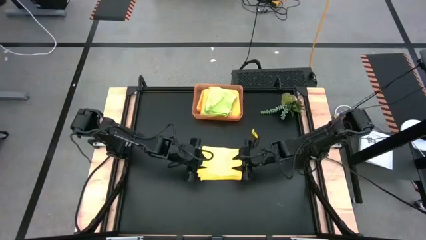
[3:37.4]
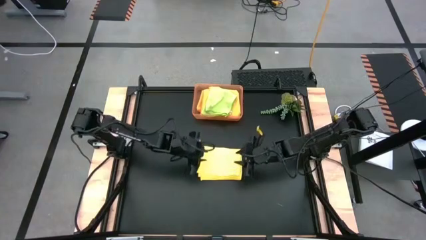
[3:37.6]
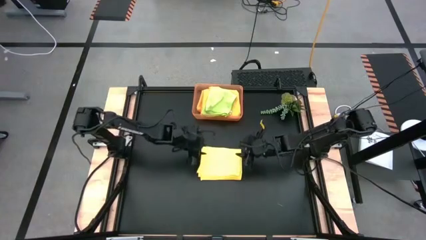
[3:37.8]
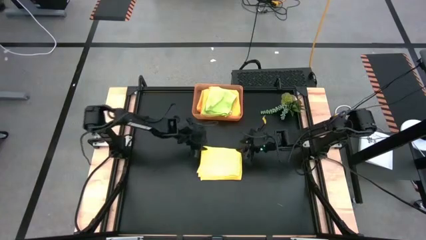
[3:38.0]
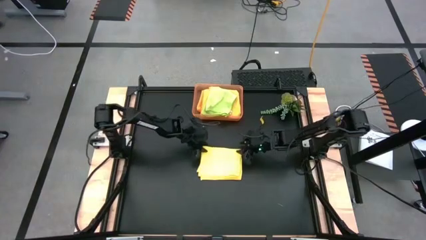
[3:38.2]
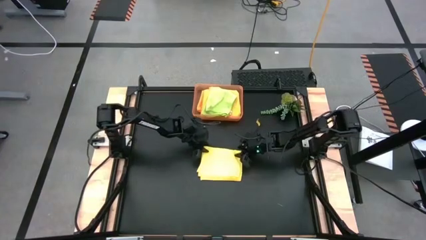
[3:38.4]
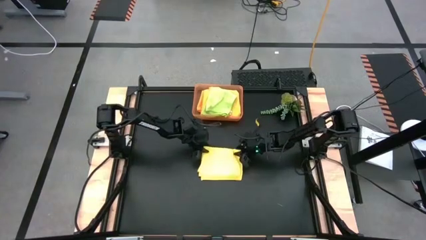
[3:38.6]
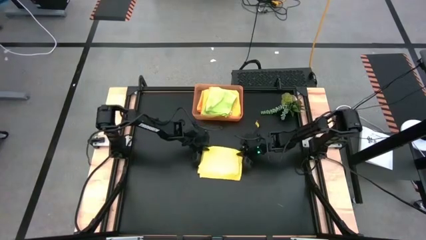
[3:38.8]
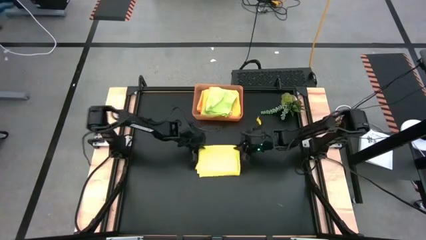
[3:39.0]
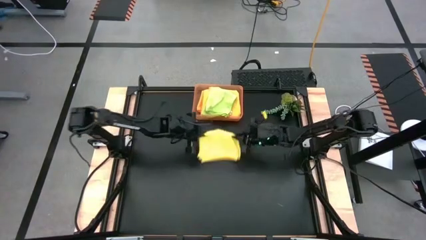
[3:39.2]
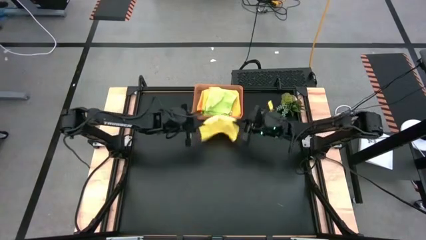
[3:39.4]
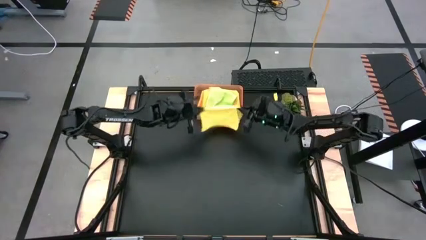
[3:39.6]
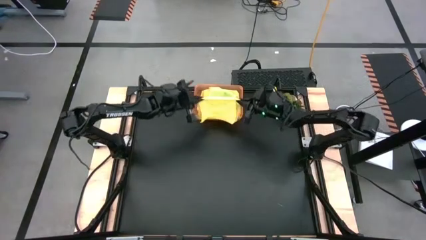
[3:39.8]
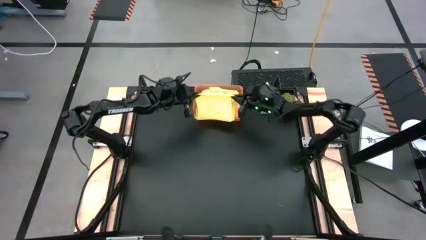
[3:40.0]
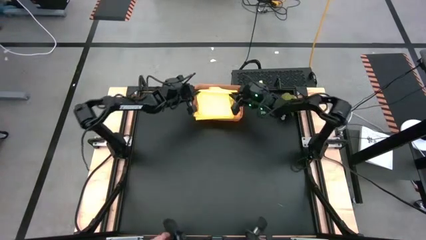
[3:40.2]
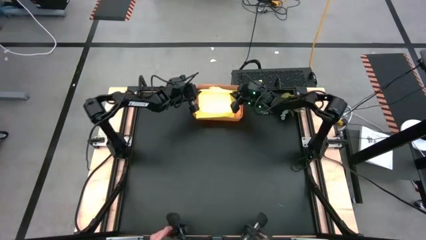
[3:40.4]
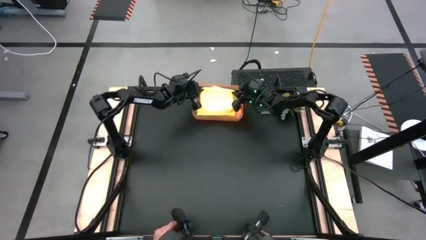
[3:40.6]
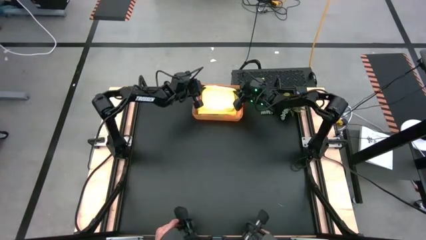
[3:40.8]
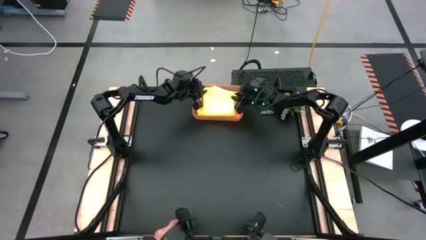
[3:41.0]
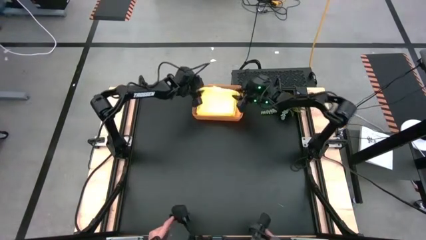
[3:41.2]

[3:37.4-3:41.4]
Task: Fold microfiber towels
Put the folded yellow towel into the orange bin

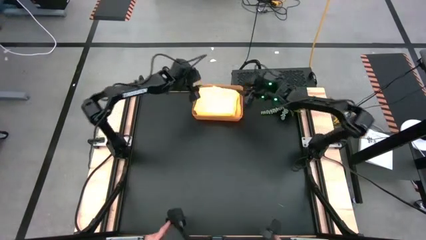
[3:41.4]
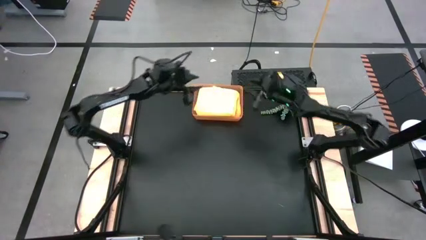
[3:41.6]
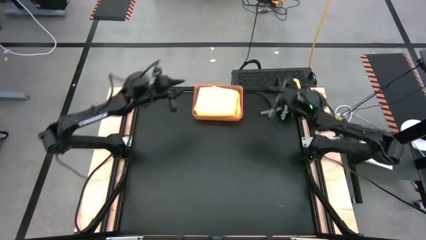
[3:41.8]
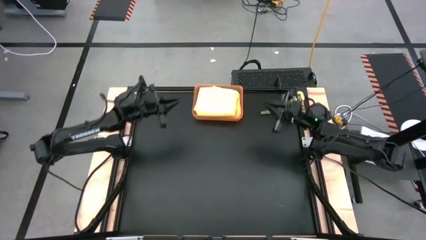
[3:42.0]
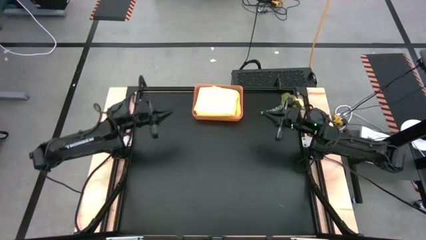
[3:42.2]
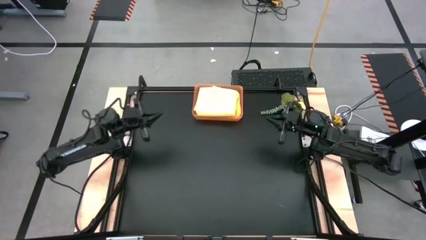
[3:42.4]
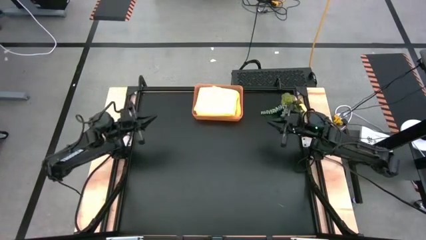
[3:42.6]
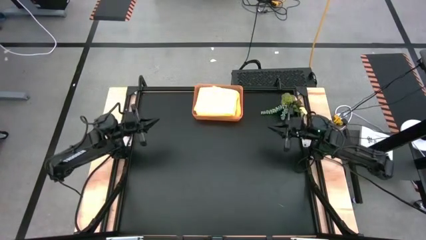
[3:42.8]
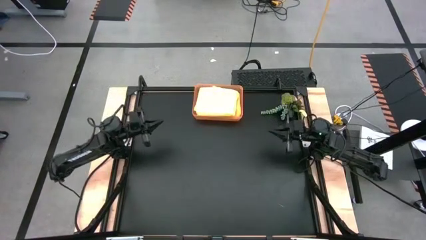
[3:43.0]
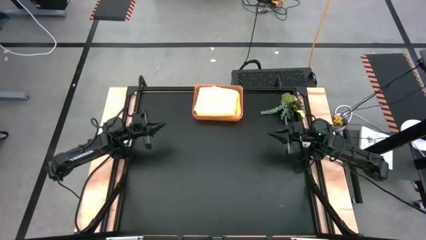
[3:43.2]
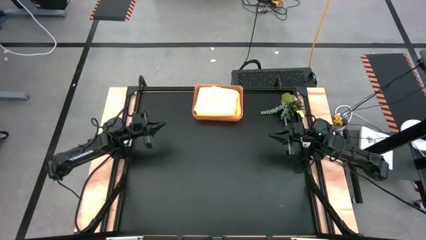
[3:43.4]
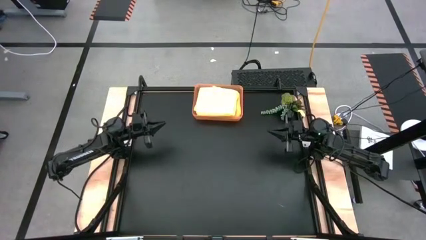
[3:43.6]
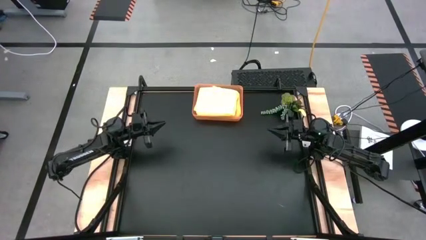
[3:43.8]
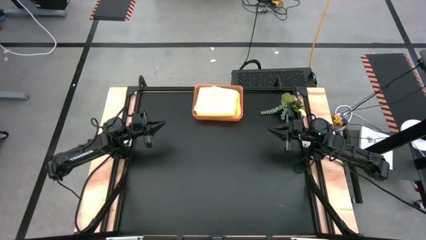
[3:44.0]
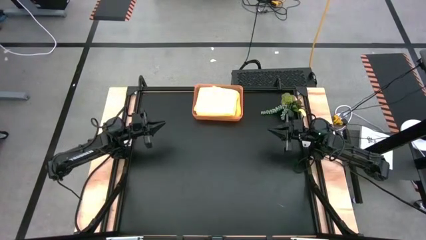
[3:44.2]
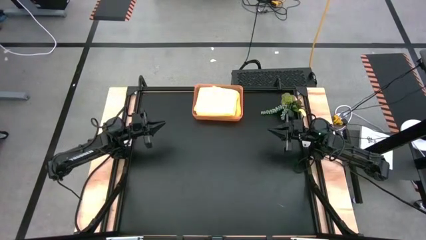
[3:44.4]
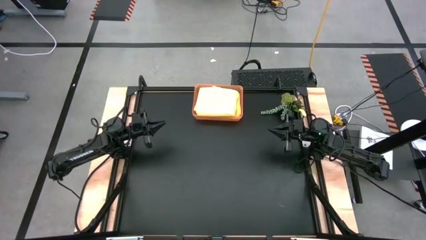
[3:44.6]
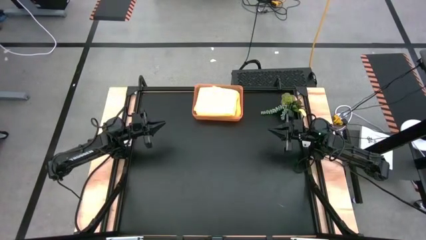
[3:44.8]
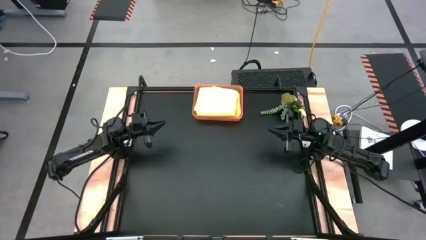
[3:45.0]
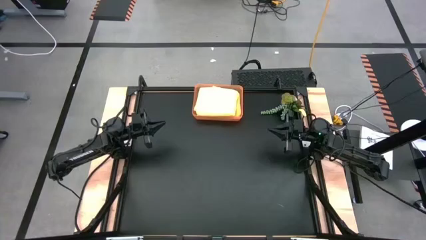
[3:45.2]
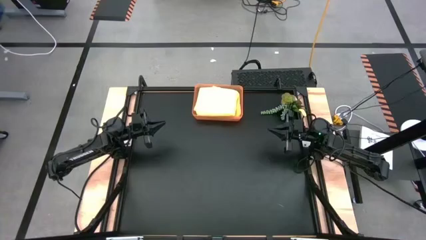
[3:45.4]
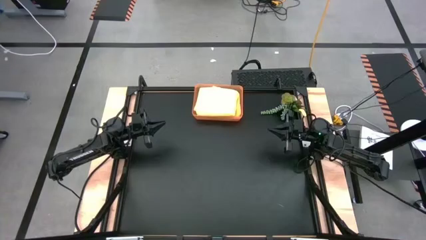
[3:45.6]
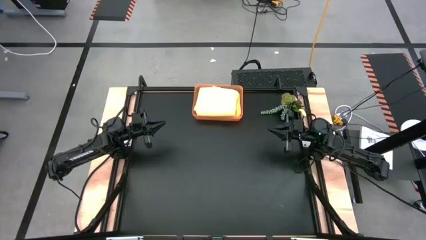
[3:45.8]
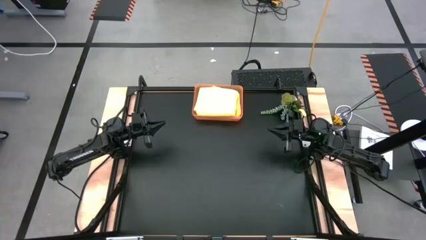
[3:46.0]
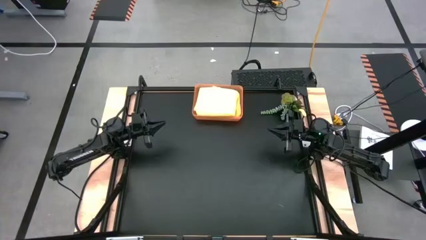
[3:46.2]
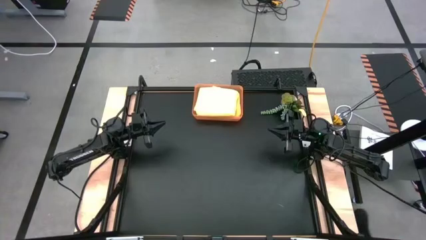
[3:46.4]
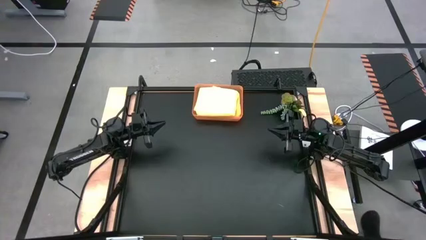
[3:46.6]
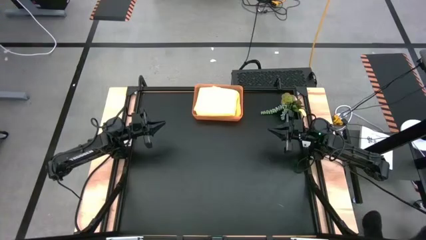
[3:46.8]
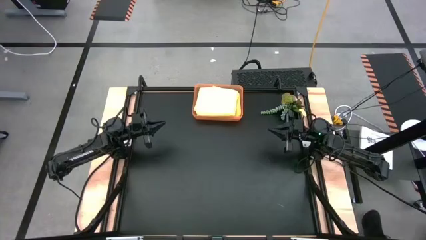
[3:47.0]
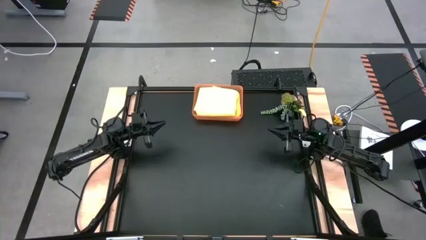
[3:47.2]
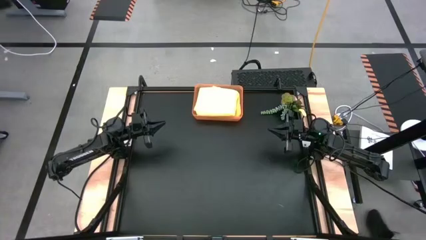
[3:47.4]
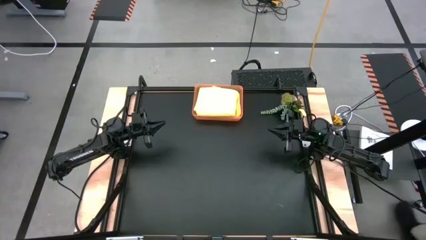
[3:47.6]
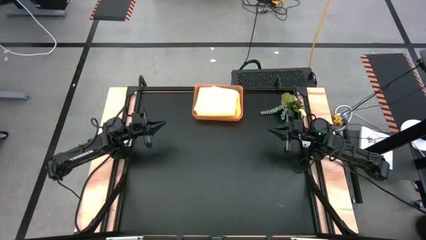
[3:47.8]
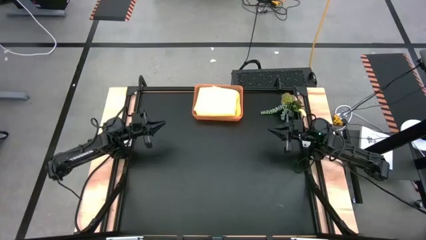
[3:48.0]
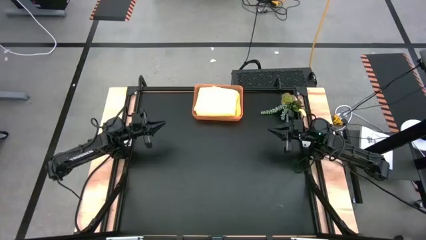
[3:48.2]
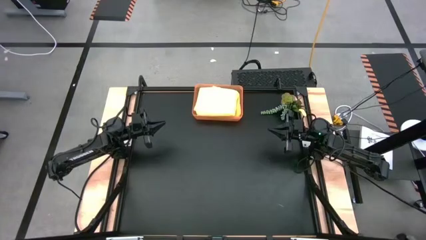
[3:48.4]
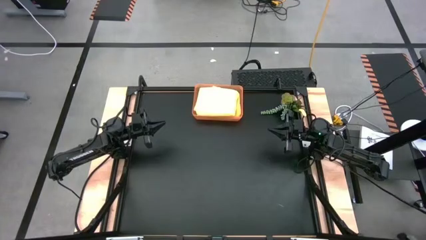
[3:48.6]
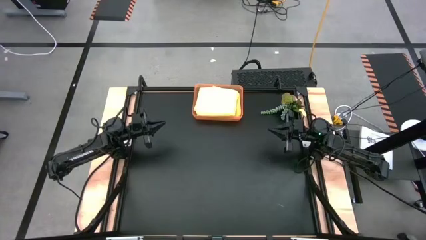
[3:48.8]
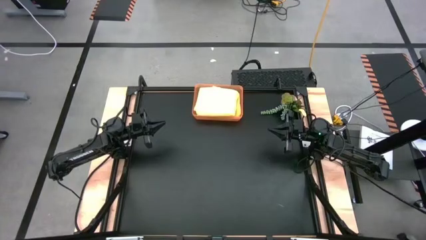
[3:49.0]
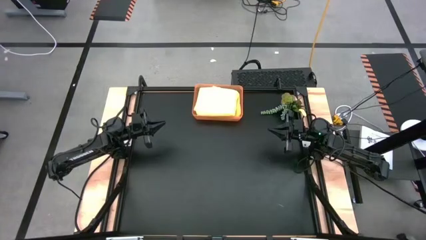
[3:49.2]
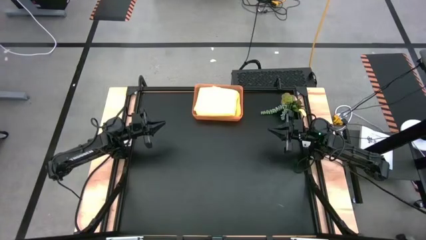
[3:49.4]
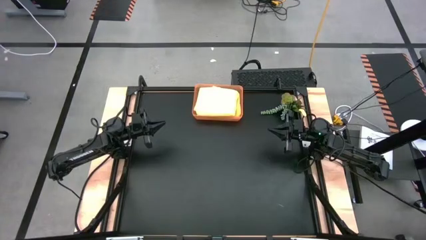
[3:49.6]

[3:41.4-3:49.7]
Return to Home Position

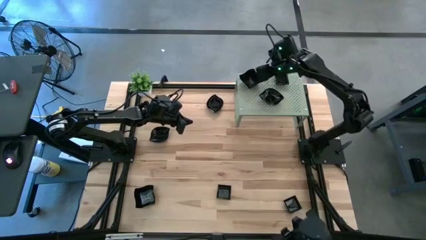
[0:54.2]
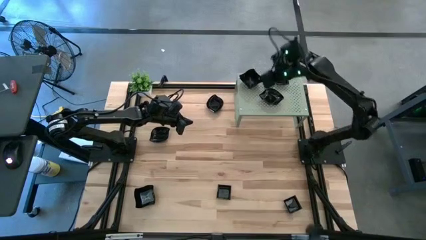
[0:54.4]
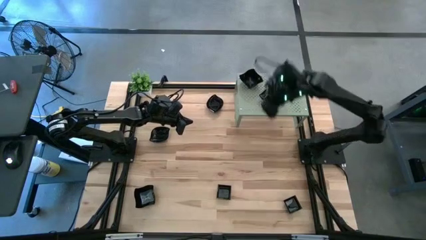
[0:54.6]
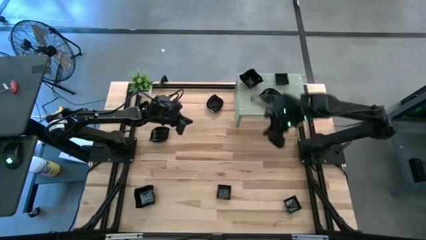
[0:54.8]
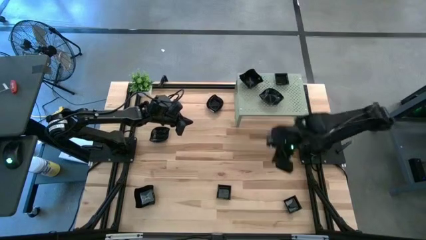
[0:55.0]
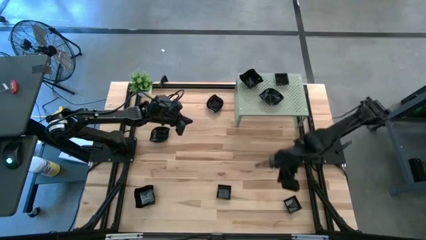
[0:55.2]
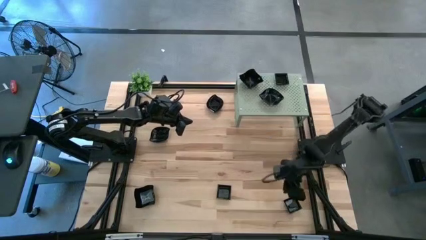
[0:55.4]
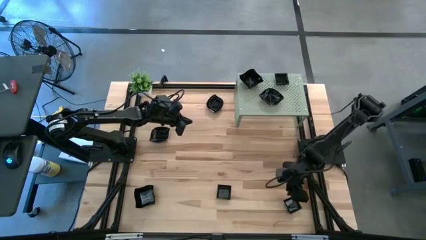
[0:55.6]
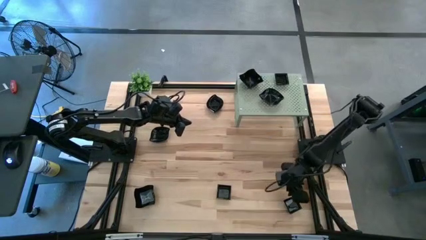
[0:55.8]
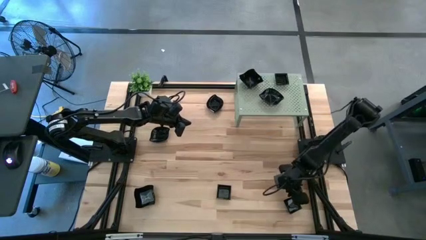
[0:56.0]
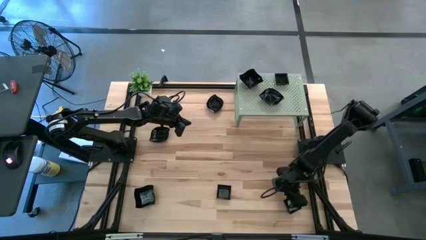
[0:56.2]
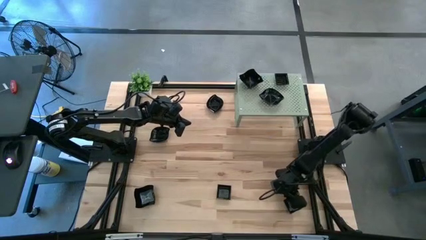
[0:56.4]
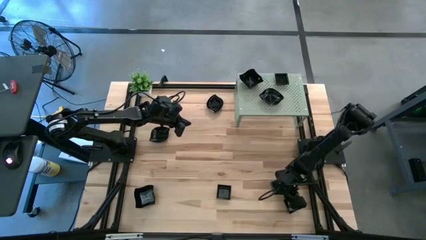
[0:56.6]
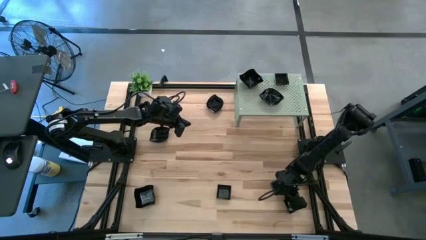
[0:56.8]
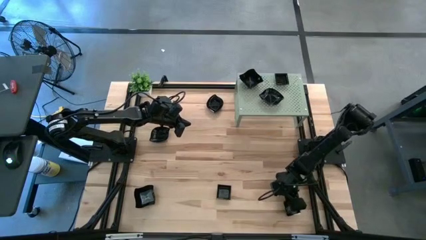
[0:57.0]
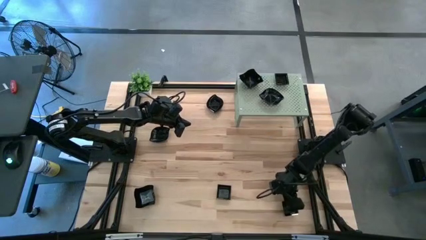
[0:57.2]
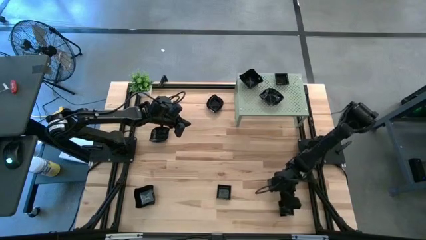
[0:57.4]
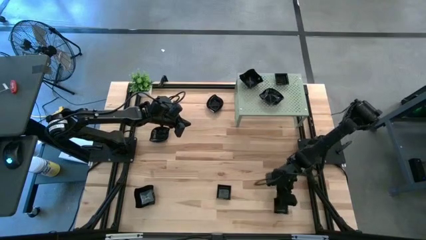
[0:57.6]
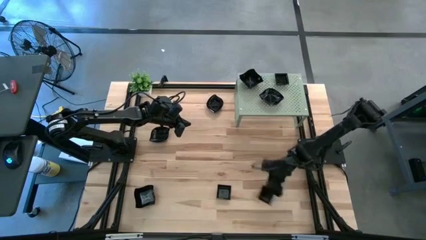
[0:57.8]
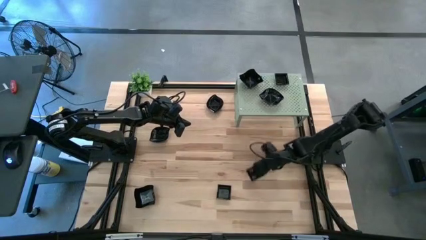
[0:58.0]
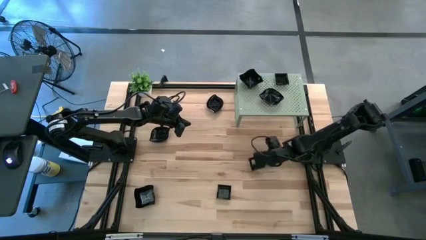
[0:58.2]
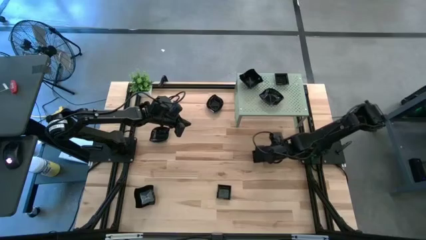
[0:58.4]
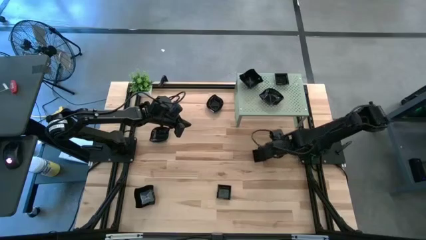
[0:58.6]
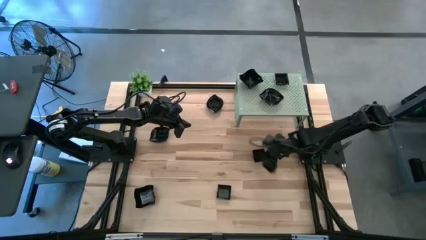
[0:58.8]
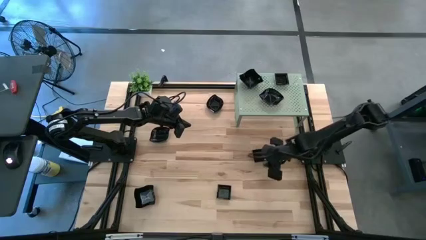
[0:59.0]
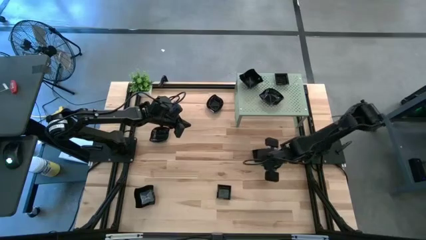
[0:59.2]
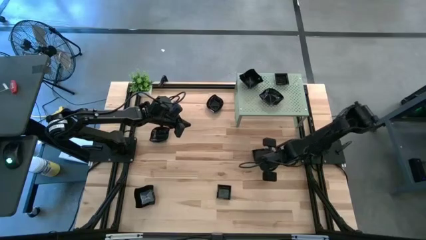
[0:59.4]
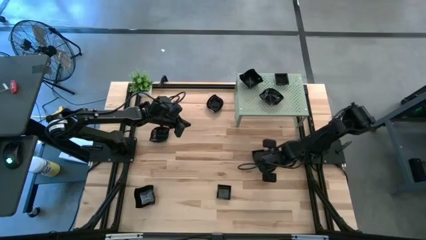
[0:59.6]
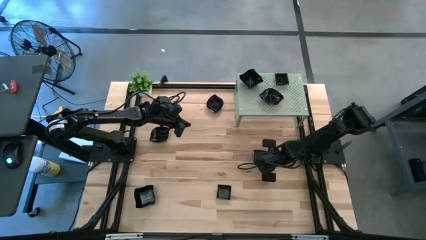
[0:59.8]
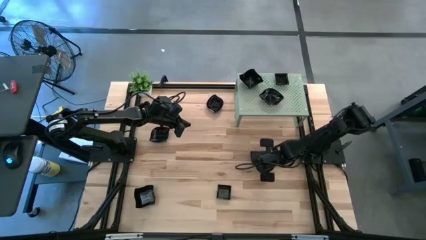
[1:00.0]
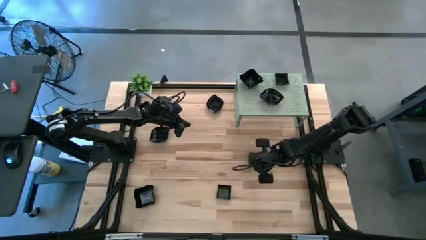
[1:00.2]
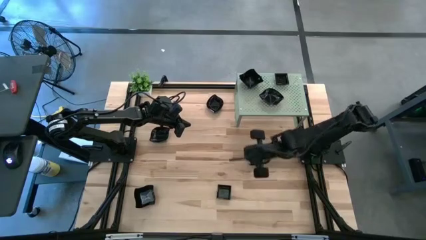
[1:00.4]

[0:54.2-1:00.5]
Task: Pick & Place Mini shaped plates
Stack the square plate on top of the square plates on the shelf
